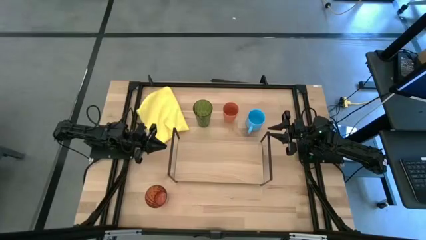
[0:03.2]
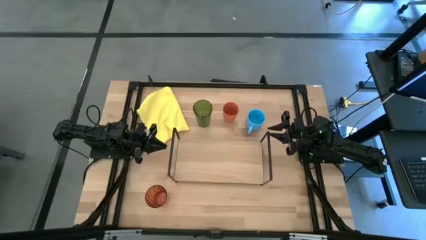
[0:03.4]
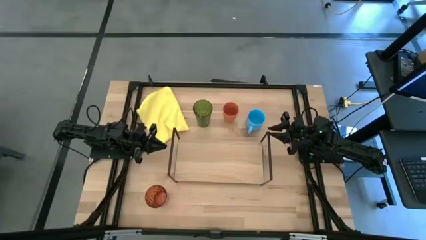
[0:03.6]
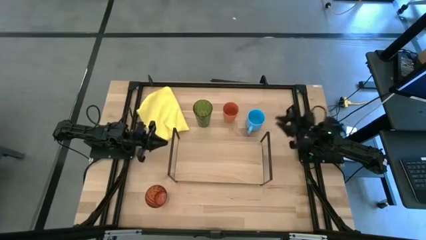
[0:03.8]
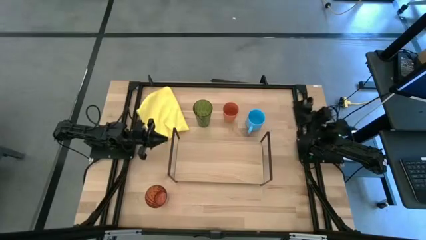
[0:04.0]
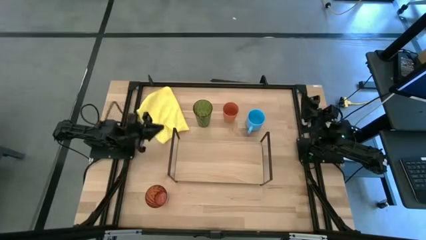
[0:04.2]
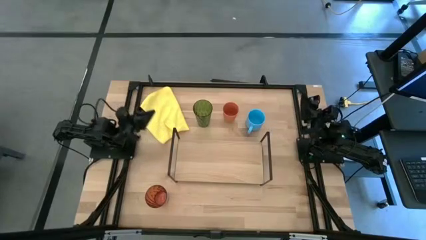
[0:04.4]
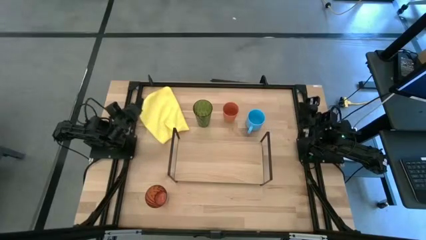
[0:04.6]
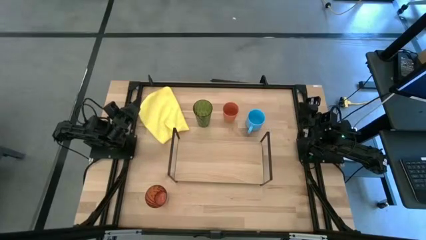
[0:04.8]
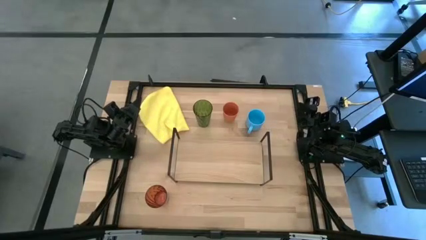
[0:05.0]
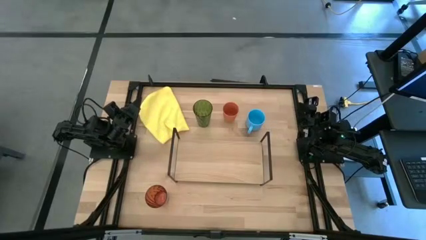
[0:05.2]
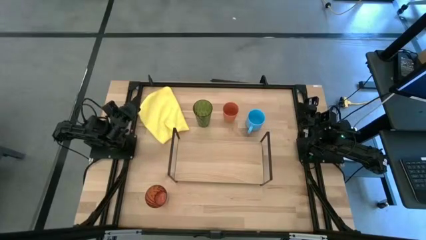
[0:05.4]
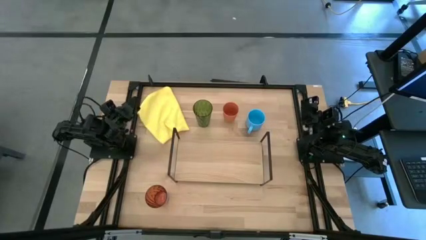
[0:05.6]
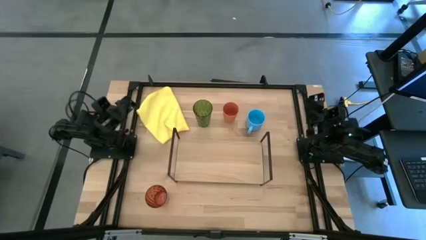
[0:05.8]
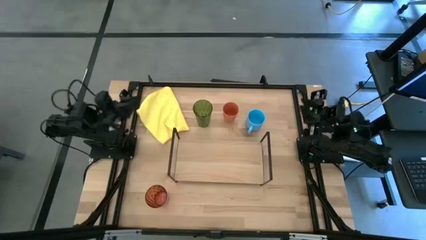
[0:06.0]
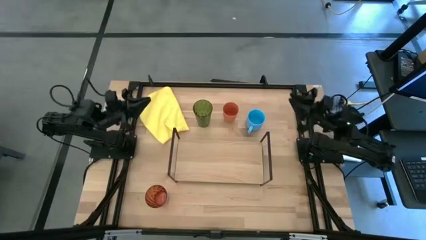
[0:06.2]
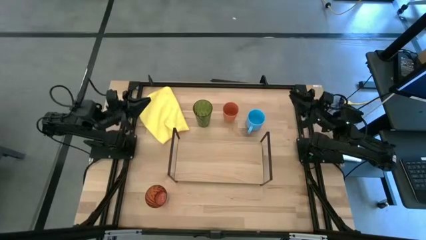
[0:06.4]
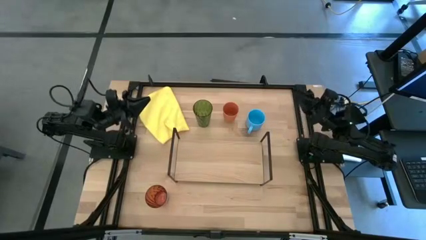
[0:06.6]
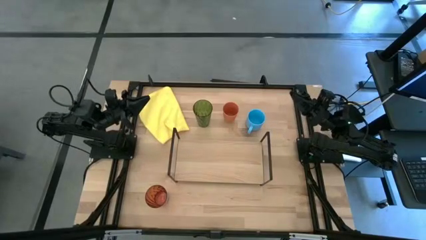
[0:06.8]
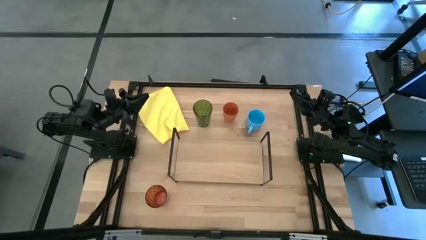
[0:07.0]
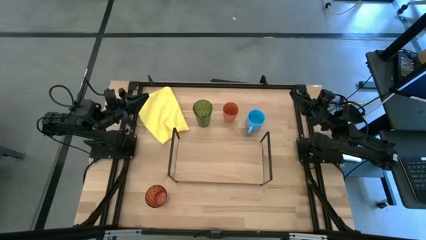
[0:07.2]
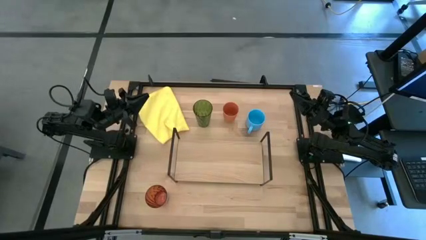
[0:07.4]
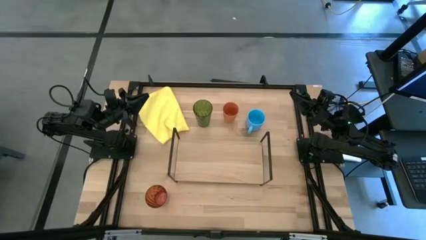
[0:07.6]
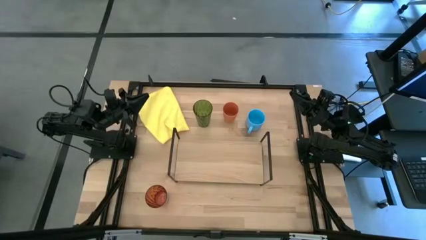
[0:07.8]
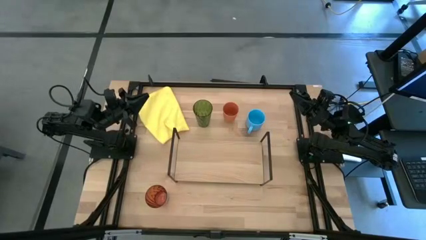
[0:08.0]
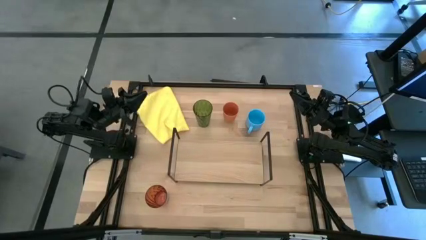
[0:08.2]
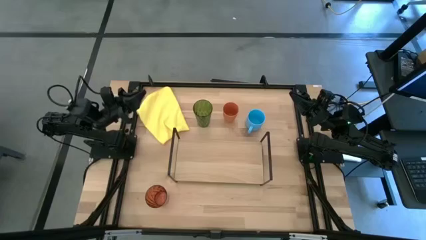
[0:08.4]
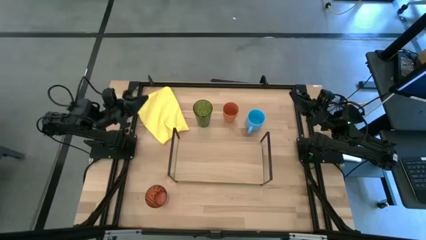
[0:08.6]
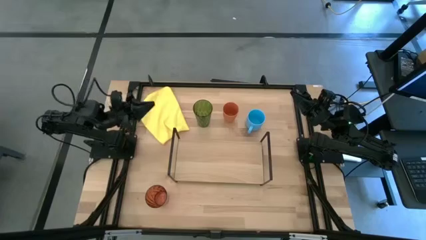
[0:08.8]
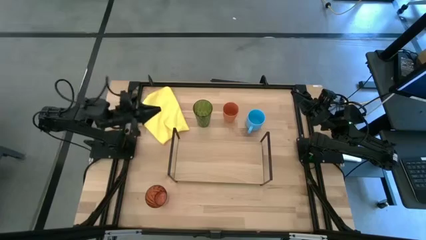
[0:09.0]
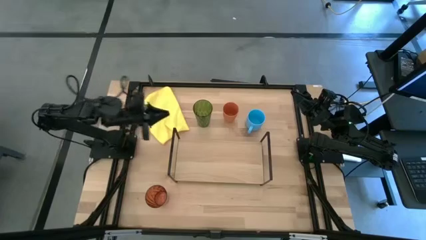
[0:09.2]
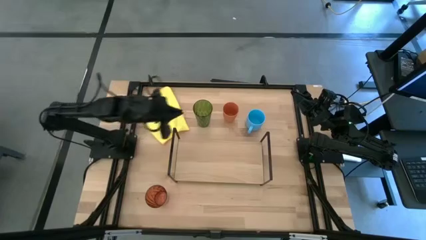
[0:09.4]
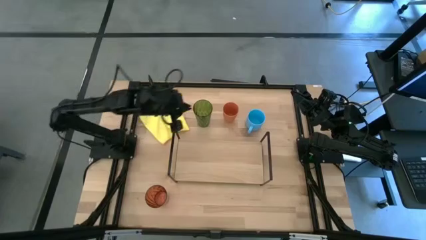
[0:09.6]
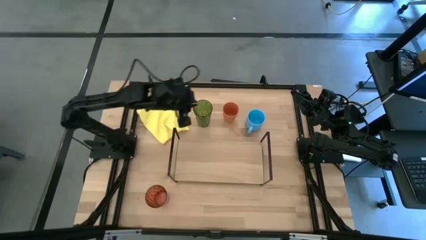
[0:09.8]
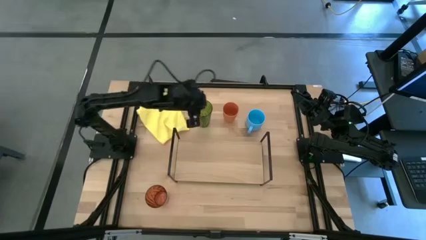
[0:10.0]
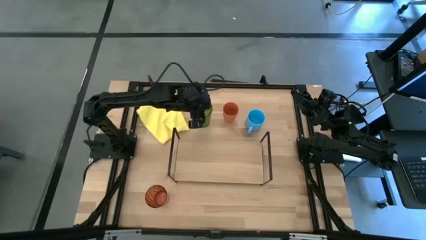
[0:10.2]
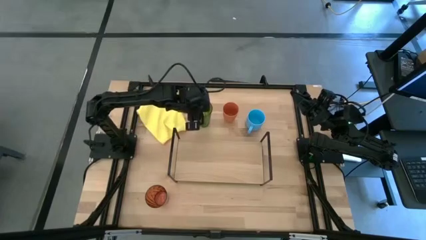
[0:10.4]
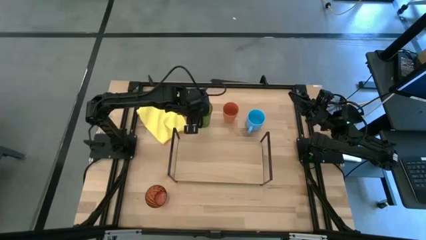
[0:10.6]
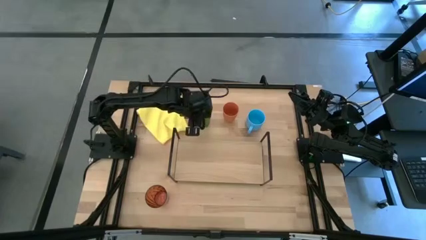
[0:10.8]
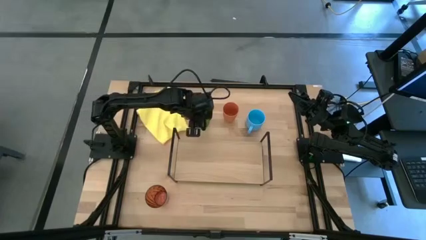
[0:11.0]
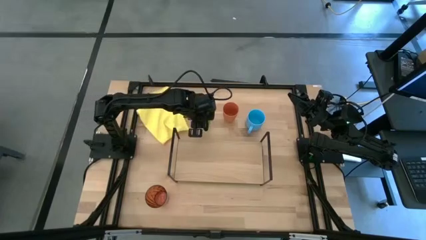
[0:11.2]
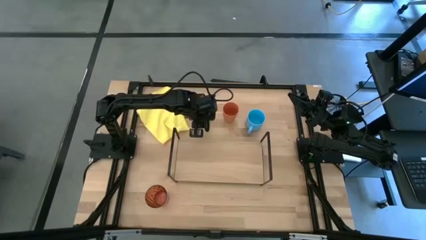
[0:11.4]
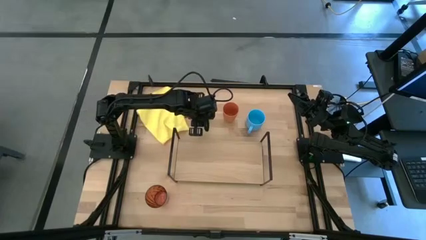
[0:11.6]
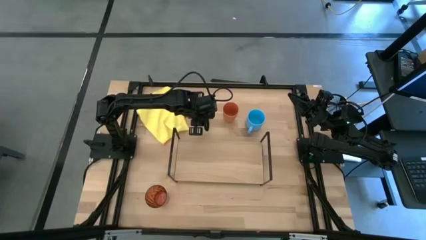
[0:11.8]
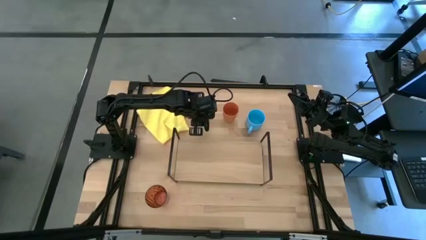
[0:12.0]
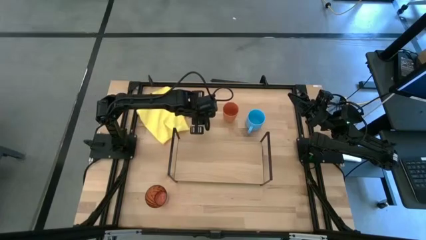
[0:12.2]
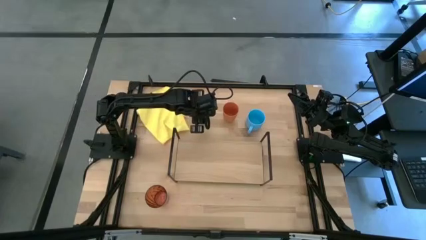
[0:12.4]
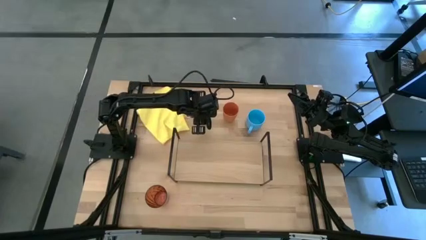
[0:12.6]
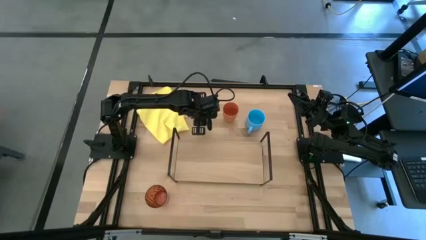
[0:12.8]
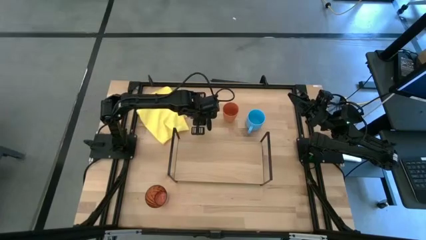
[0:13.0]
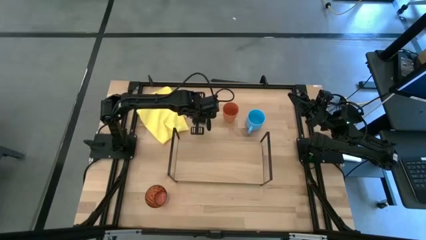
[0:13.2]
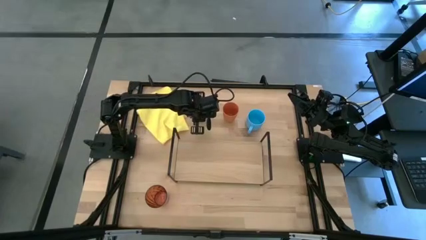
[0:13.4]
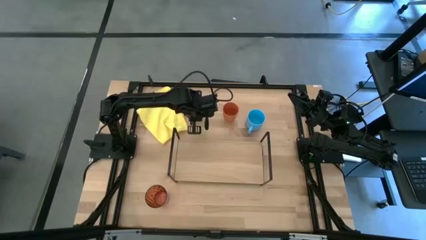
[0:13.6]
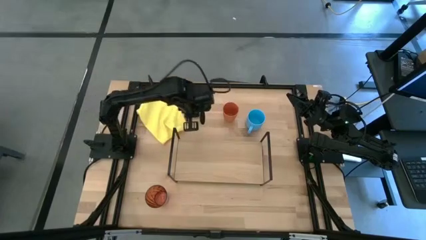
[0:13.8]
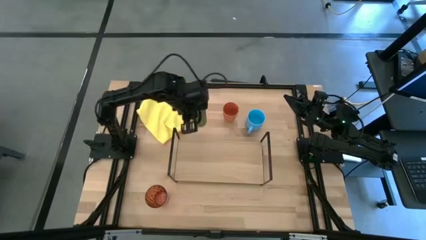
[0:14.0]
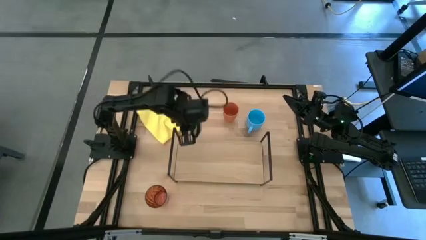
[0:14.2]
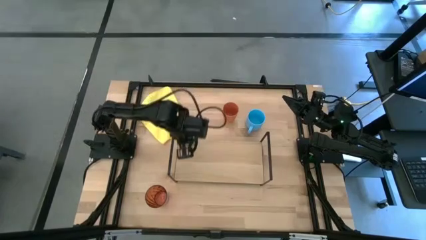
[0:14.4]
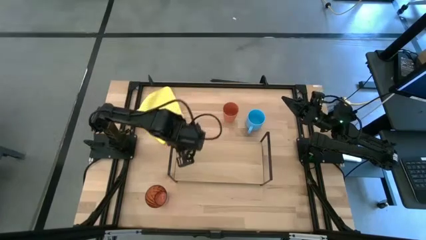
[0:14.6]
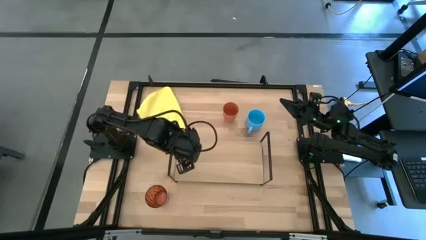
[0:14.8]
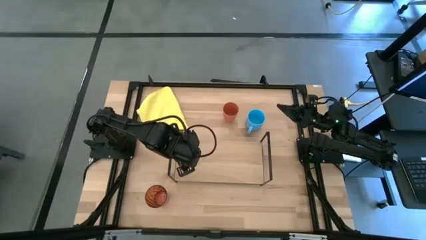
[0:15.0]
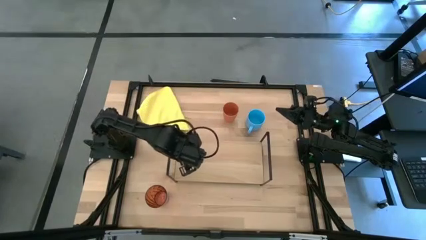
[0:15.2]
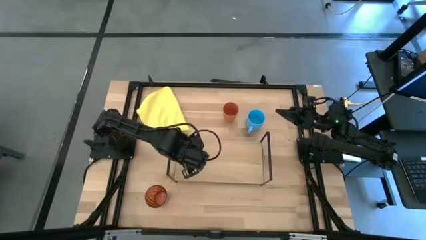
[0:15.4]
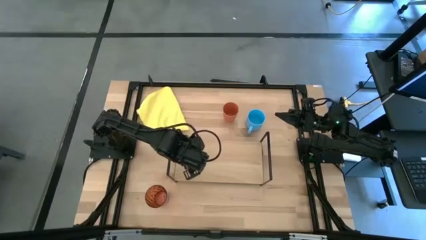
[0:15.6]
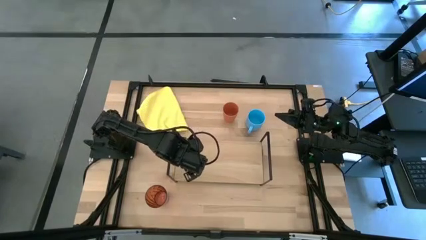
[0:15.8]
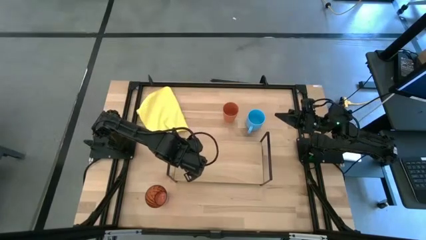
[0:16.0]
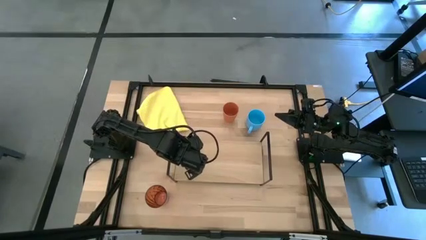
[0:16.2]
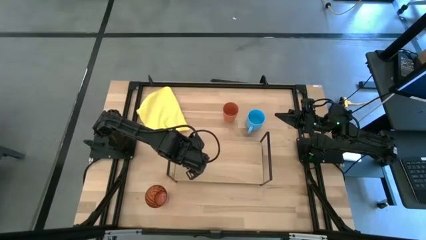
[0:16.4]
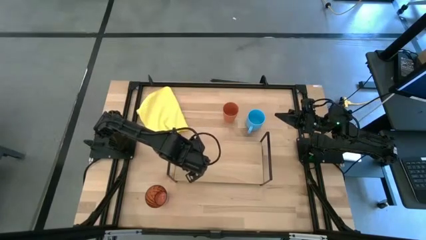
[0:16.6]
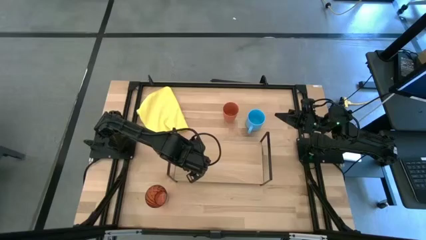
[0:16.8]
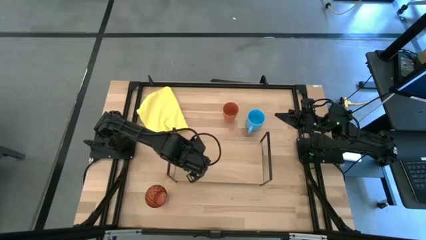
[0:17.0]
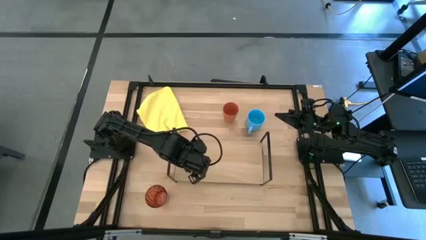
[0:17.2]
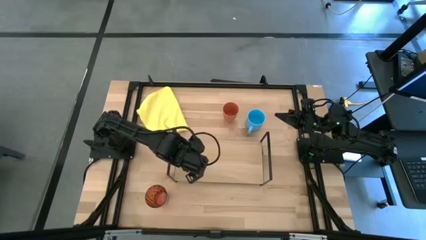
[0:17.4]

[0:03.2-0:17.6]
Task: Stack small to large cups/mugs on shelf
Put the green cup on the shelf
